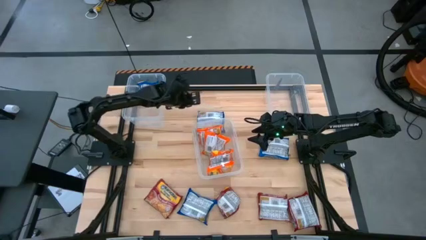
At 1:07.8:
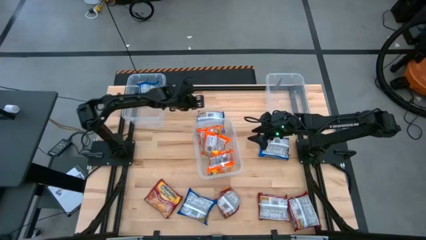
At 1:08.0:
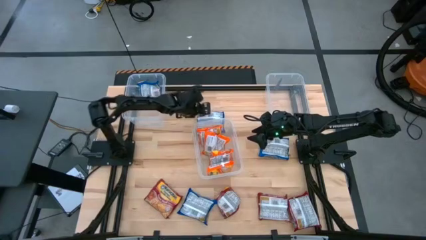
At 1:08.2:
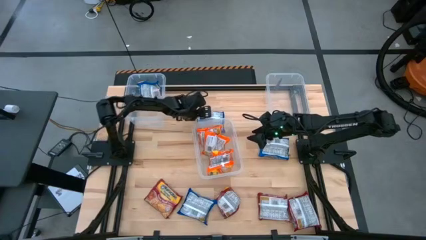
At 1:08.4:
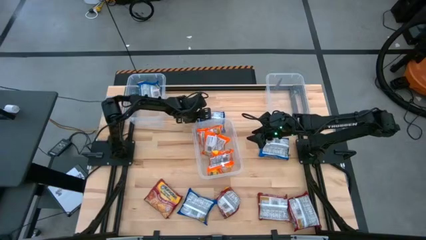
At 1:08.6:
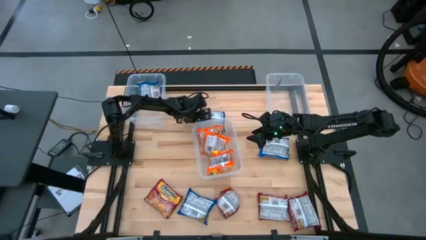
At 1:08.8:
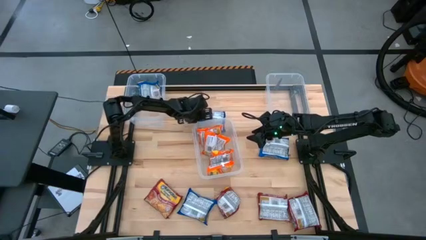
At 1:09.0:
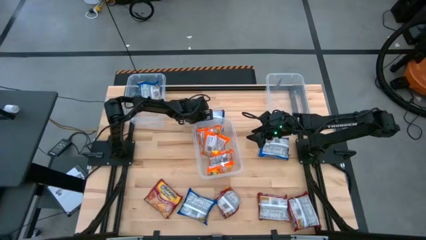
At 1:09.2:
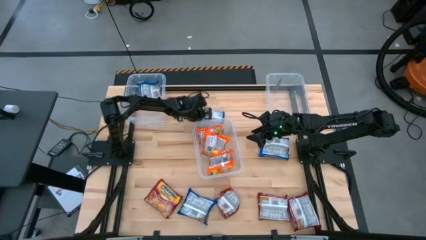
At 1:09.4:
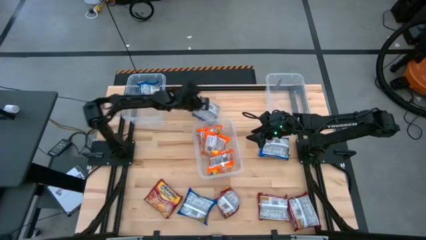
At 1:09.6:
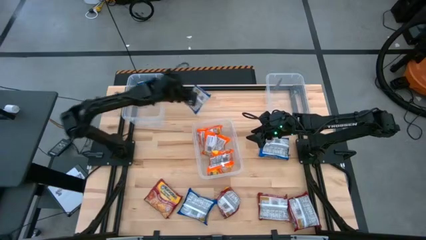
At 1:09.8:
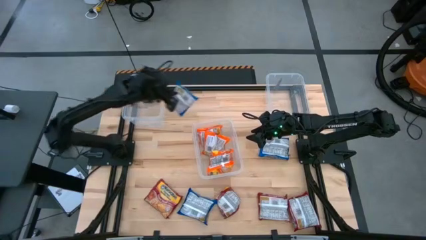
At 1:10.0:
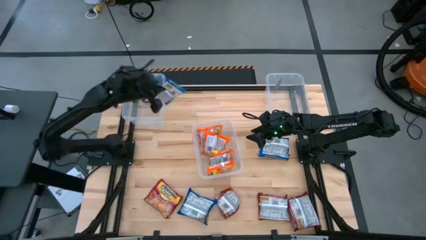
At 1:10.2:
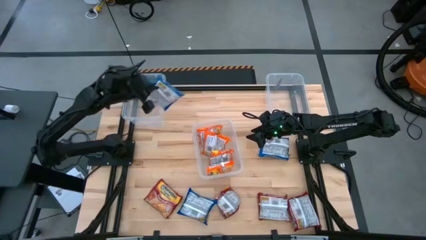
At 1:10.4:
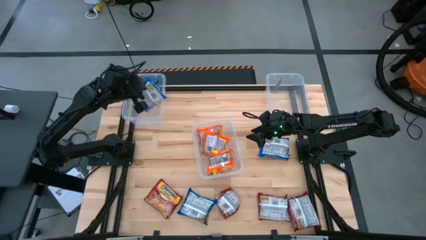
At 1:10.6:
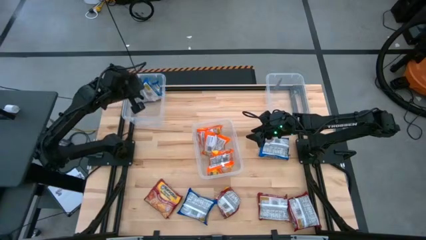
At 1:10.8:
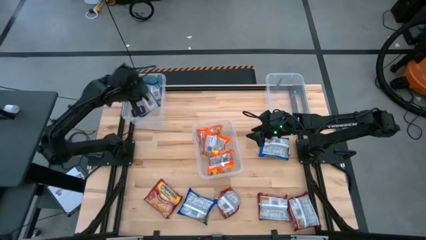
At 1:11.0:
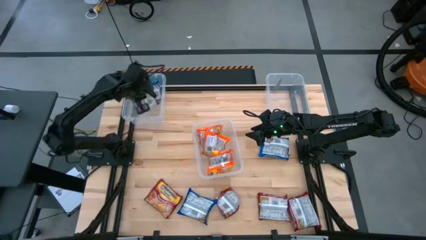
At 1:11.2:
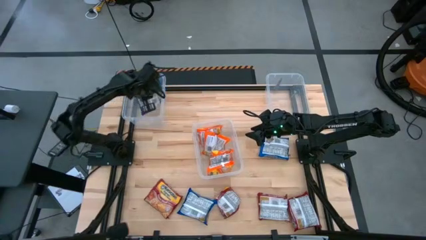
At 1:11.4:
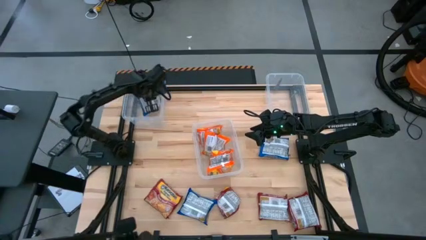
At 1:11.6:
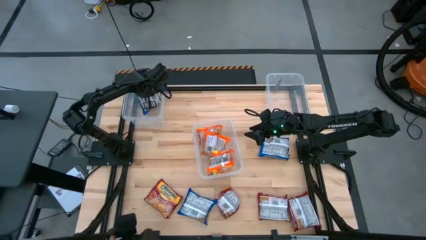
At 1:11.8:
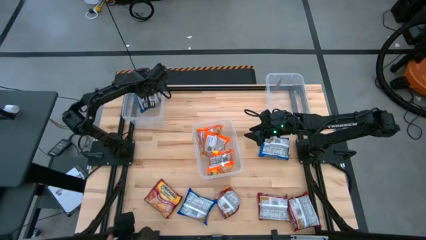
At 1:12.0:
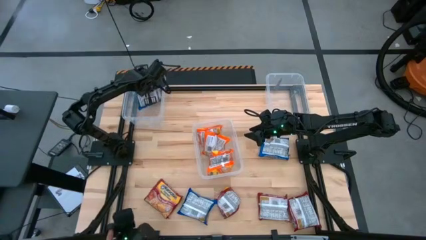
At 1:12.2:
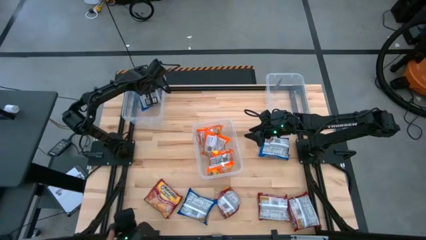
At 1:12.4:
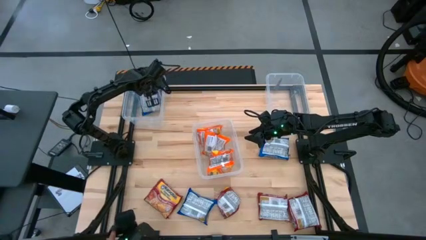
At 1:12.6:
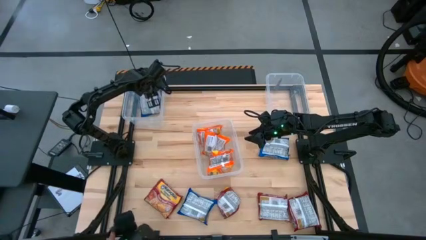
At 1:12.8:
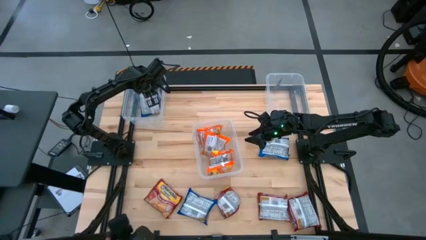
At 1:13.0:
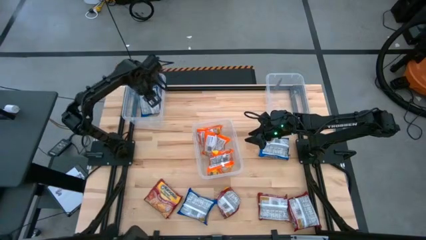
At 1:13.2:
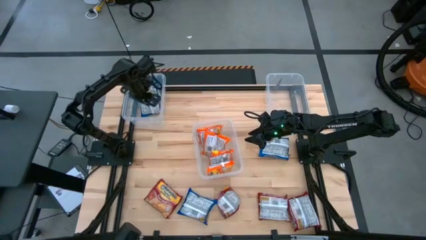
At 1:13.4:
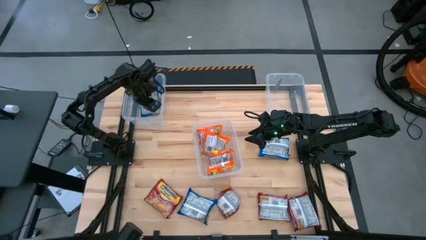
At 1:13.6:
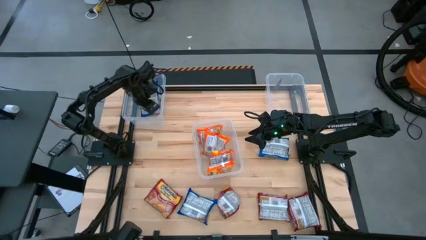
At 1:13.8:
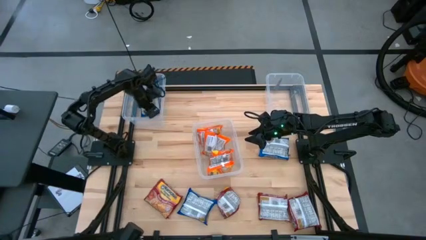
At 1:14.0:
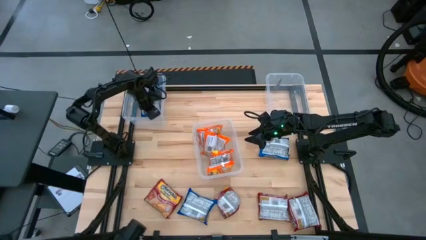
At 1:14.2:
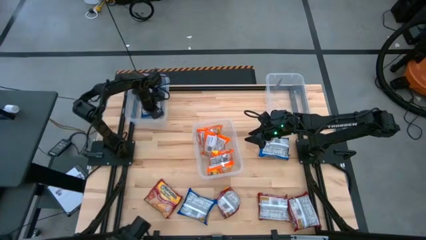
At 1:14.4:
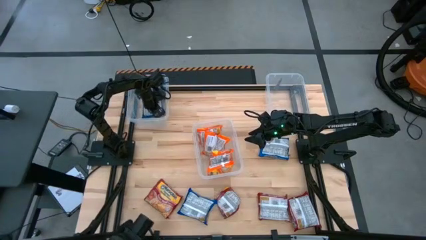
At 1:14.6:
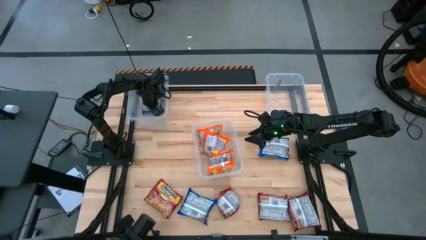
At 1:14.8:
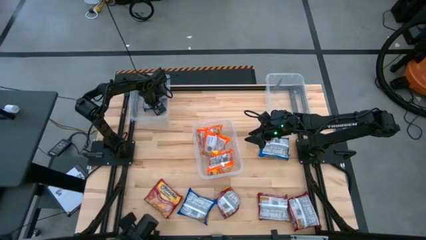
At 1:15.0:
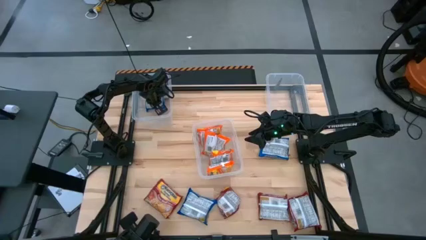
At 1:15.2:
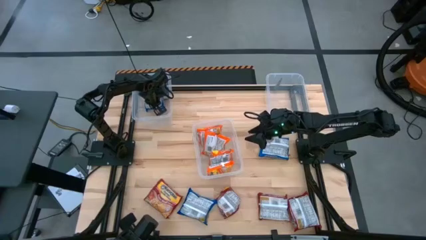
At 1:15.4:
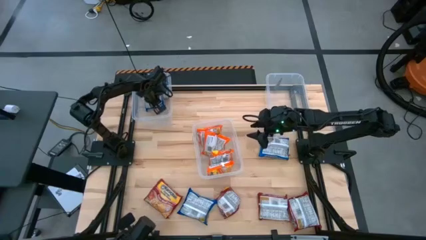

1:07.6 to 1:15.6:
Task: Sort Maruchan noodles
Put the blue noodle pack into the left transparent bin

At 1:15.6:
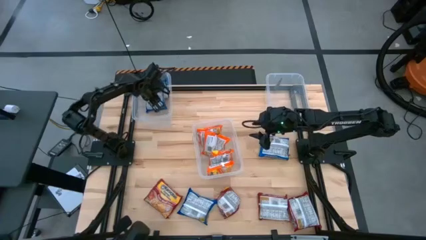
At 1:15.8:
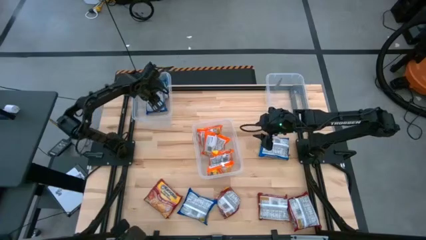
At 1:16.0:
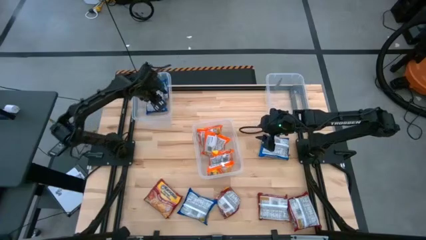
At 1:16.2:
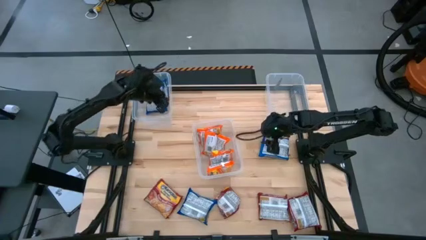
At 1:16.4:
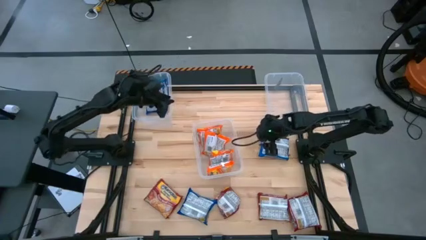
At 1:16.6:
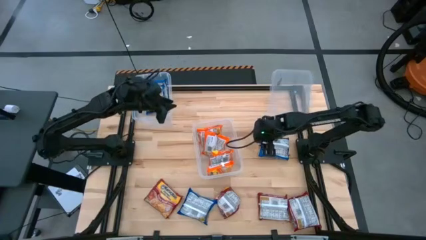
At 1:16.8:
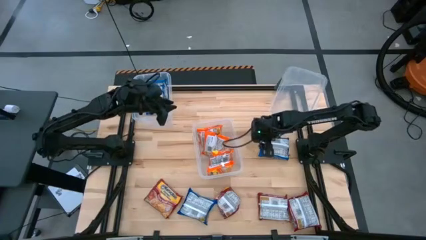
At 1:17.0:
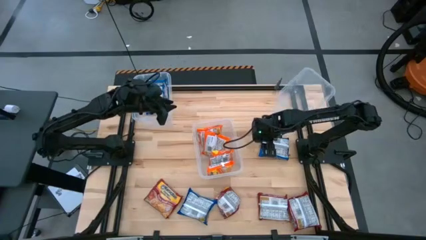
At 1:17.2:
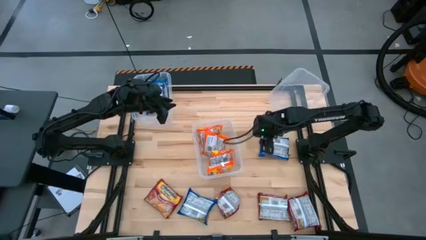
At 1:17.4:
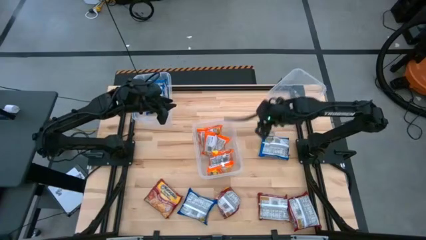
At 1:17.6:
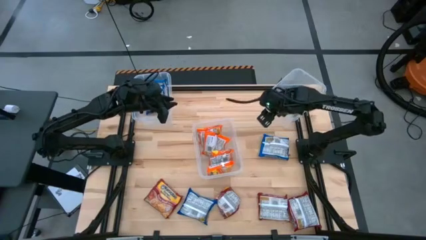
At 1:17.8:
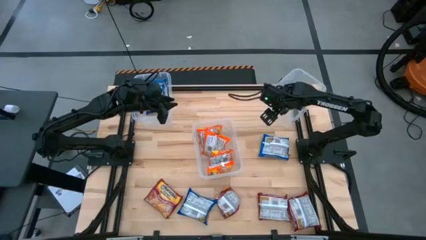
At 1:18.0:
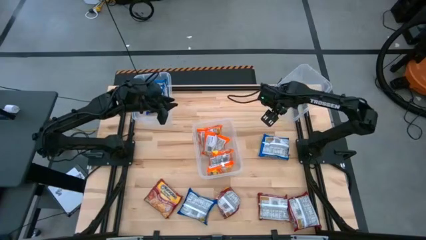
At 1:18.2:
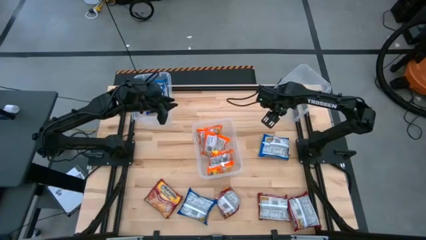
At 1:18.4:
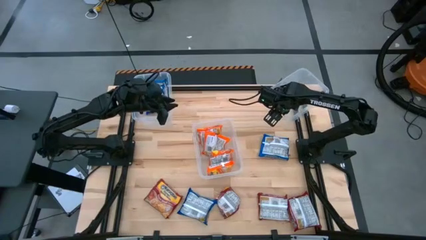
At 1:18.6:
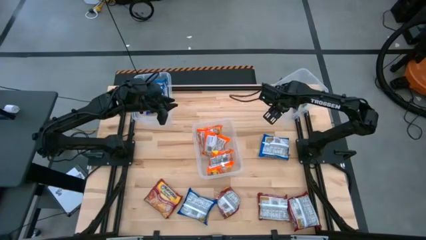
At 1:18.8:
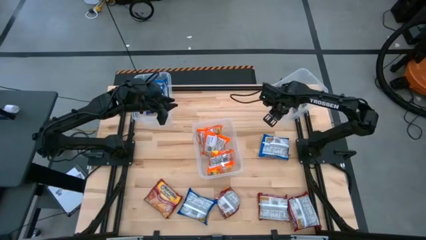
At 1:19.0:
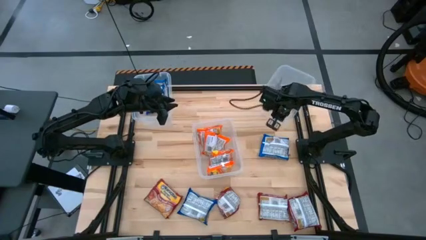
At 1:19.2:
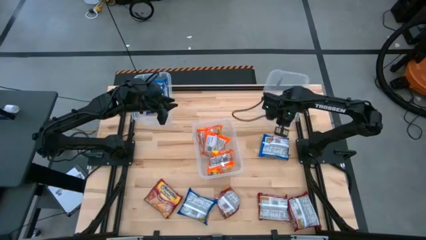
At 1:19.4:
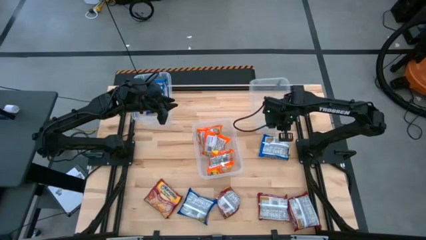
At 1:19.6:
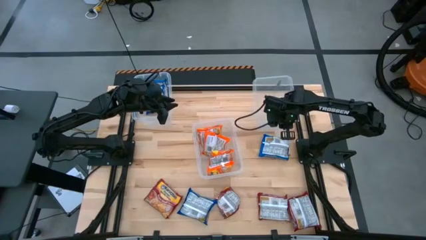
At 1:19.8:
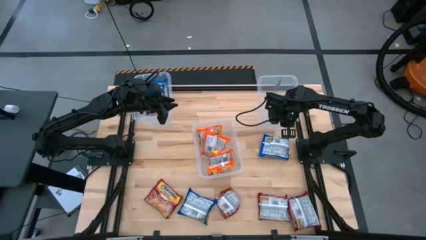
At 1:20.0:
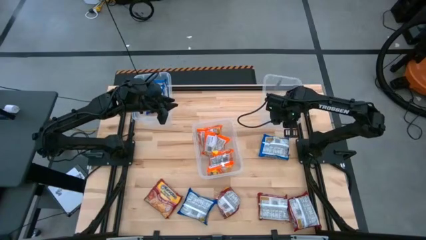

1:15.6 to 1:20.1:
Adjust the right transparent bin
